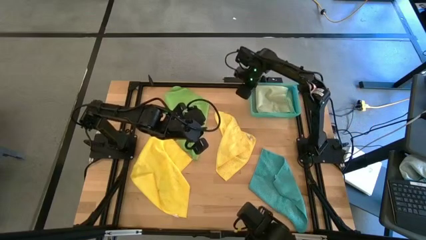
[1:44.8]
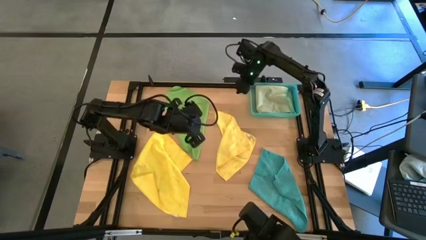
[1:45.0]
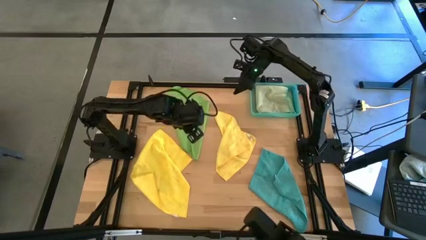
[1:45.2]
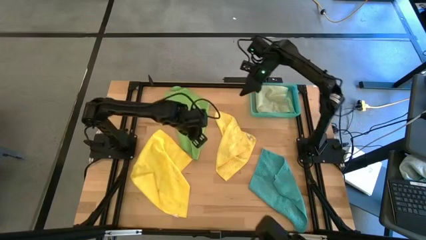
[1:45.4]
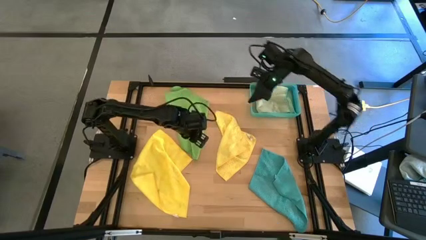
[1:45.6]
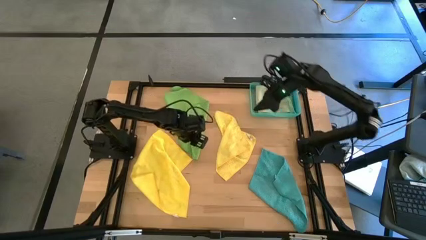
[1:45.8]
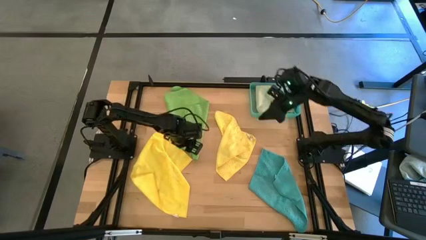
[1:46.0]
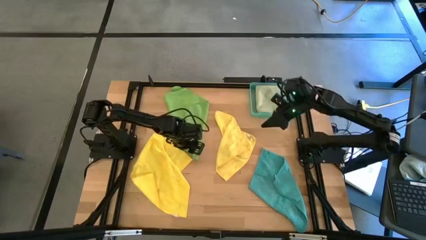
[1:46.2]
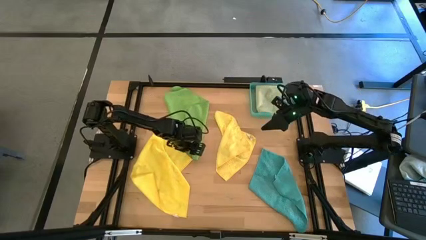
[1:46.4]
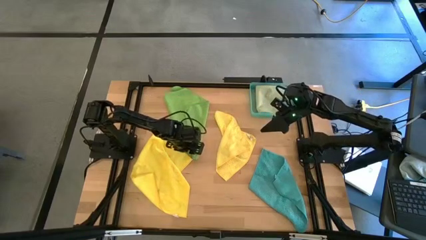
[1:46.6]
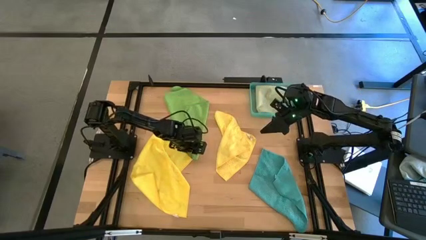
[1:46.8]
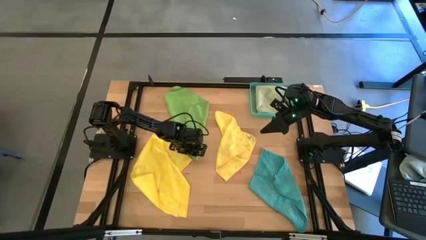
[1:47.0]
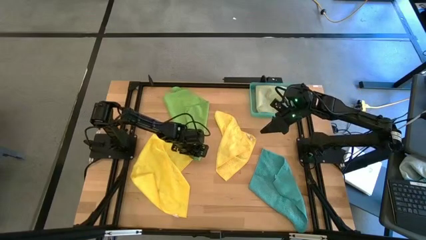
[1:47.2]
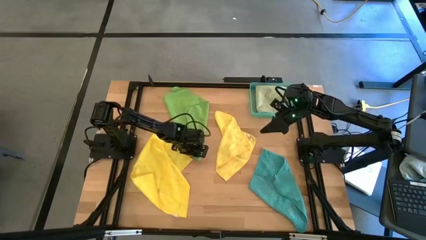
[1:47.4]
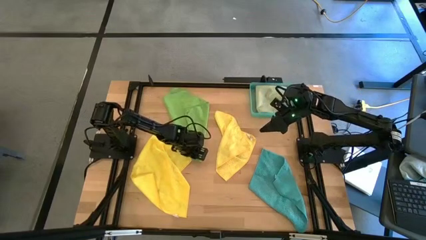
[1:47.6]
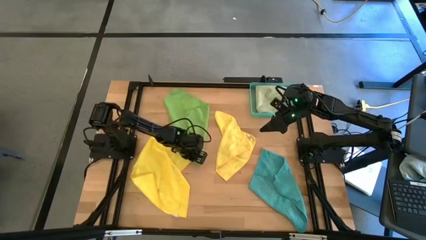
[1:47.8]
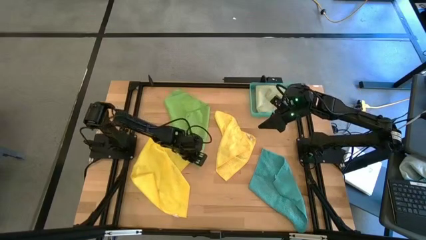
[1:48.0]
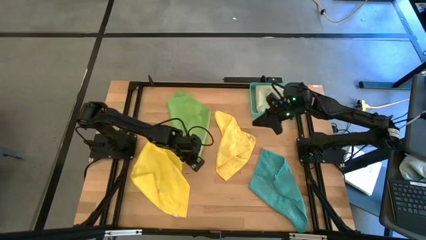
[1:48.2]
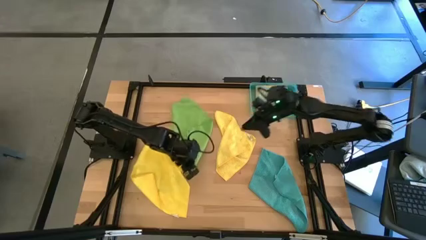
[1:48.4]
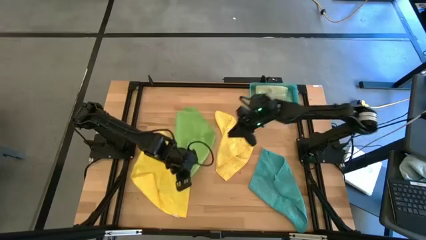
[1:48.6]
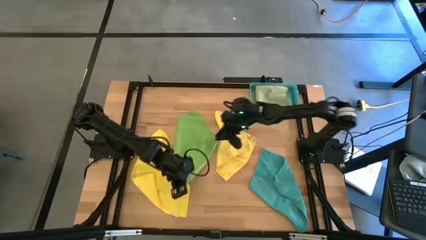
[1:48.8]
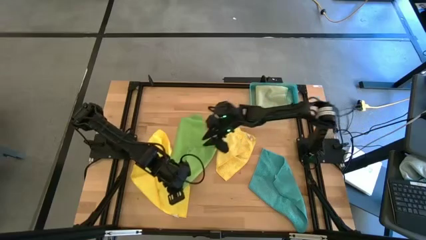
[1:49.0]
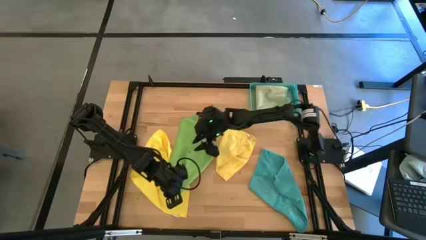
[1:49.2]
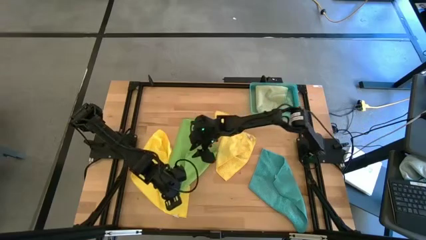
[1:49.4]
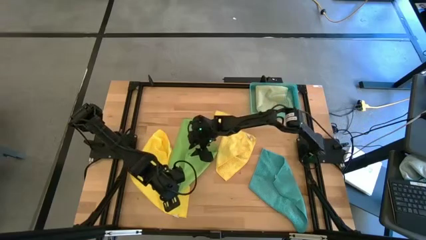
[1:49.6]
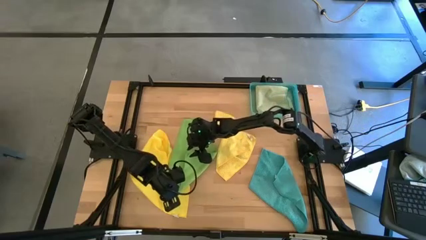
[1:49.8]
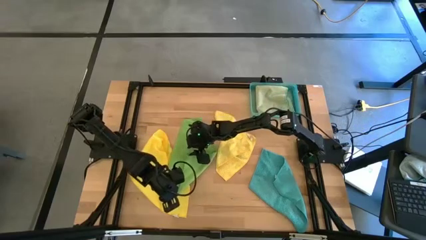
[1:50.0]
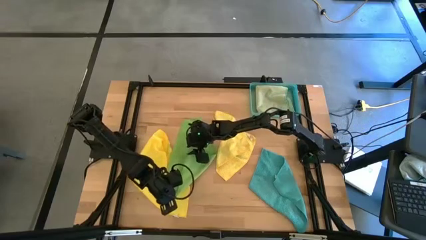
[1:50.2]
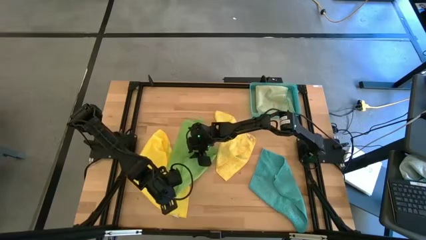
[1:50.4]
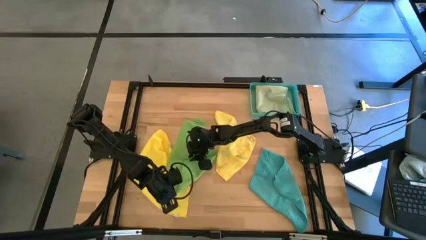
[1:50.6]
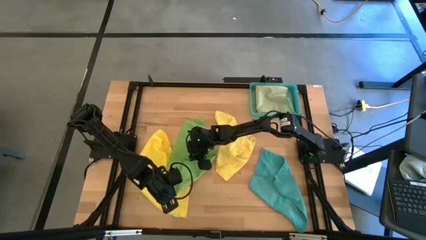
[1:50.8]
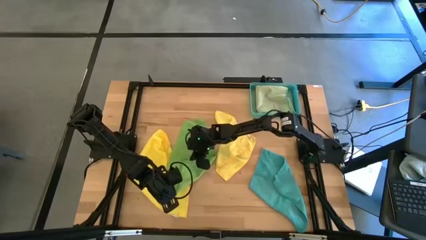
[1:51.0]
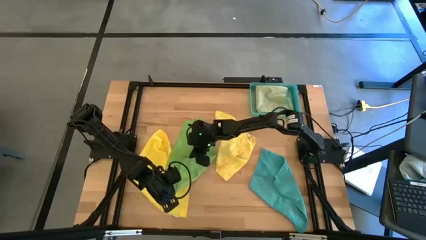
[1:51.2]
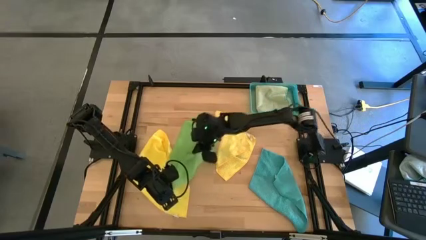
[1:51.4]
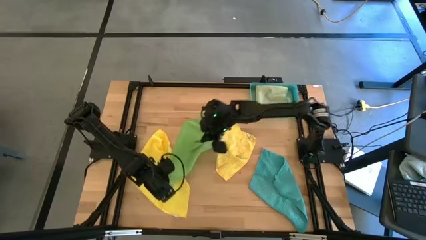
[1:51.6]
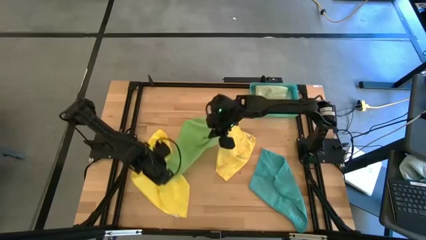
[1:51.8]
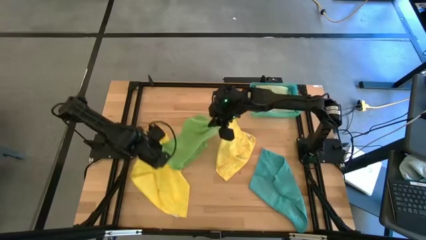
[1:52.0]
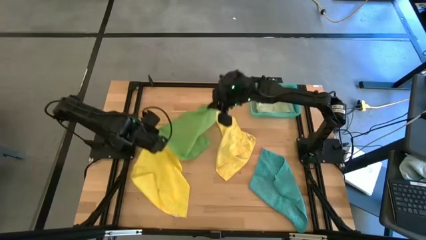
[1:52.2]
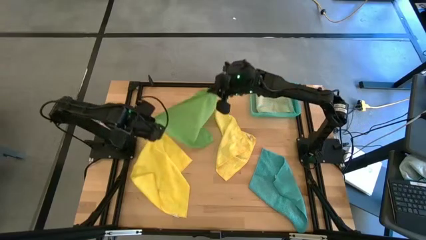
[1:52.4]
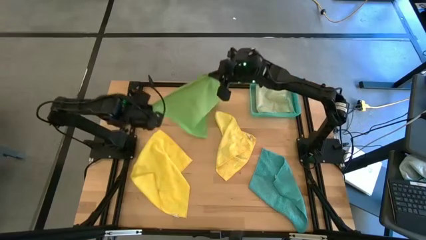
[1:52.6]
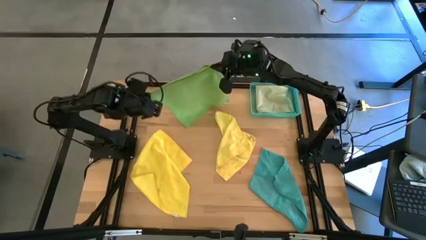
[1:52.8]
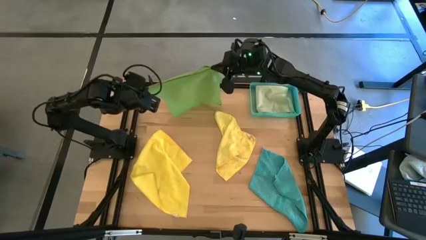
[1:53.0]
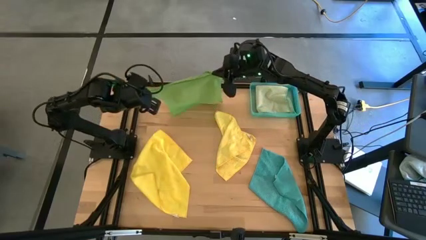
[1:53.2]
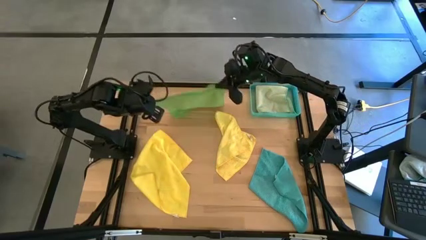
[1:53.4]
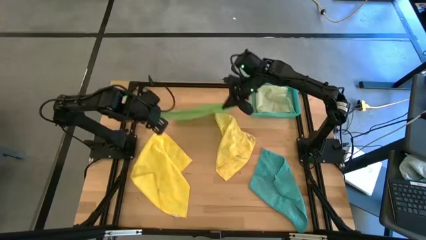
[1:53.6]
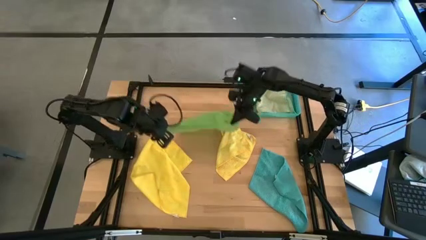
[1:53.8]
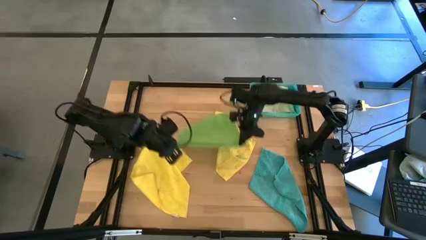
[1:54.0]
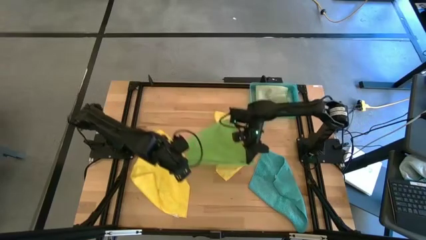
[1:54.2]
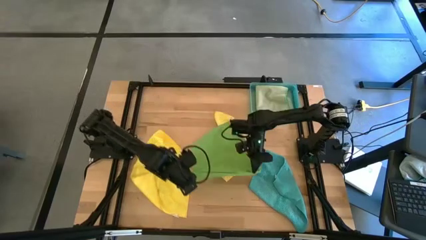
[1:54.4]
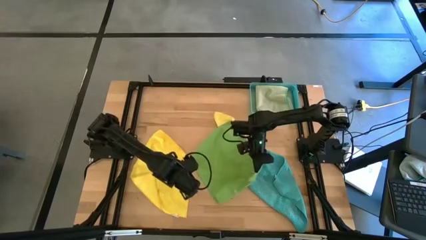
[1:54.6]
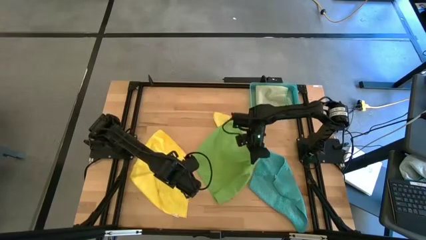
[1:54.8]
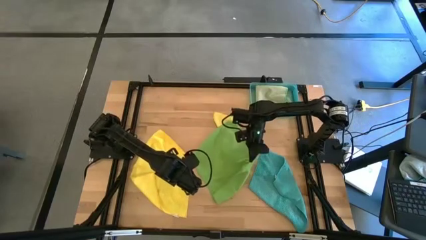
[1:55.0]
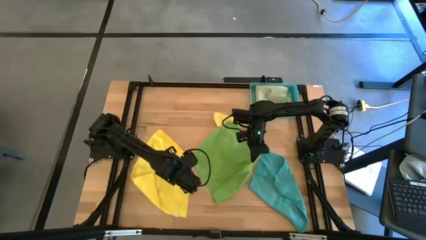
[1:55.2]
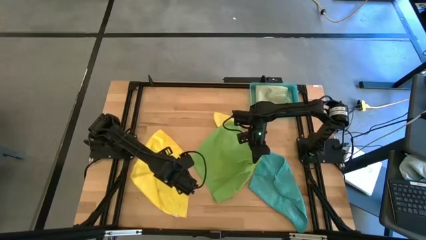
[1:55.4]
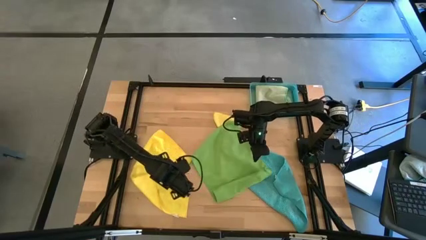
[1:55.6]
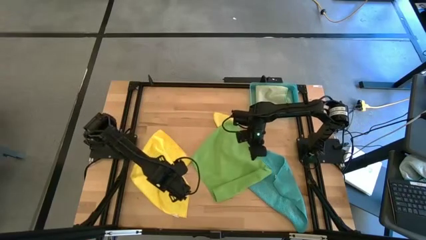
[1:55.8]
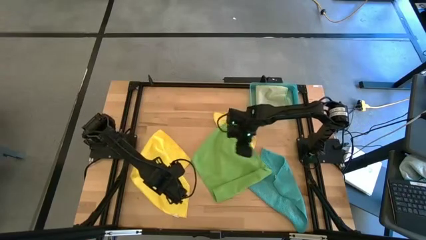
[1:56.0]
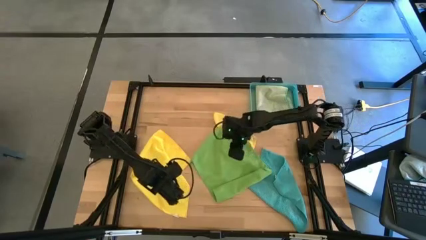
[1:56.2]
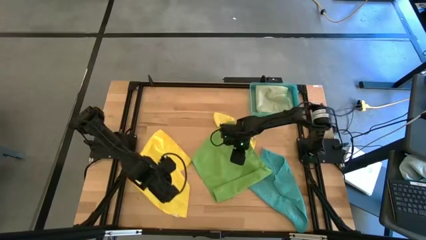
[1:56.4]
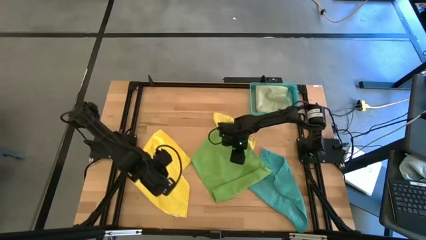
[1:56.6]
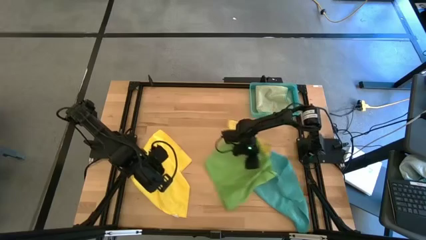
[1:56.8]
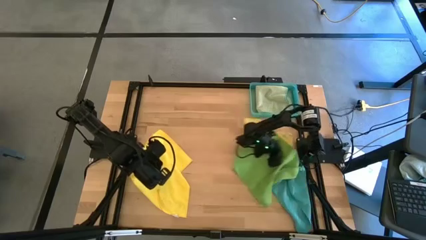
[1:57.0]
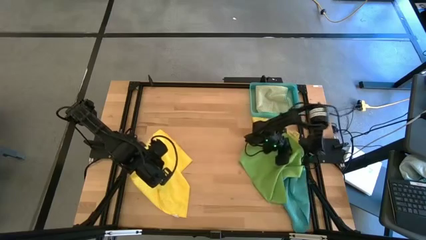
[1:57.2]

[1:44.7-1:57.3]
Task: Fold microfiber towels
Move the green microfiber cloth to the middle right of the table
